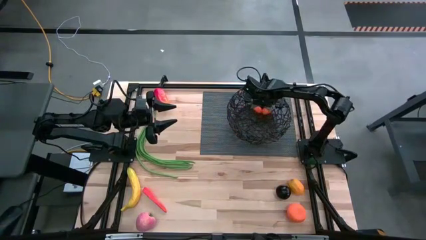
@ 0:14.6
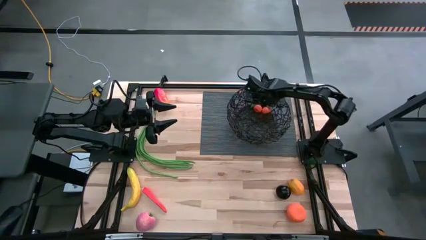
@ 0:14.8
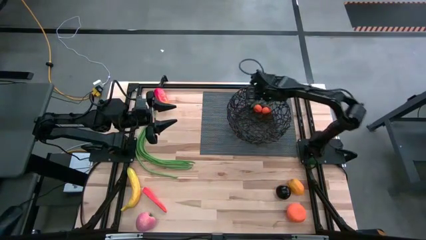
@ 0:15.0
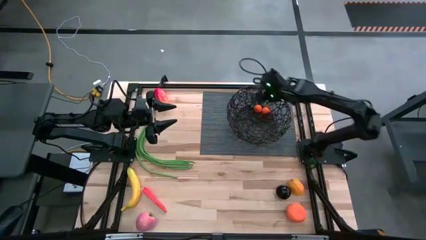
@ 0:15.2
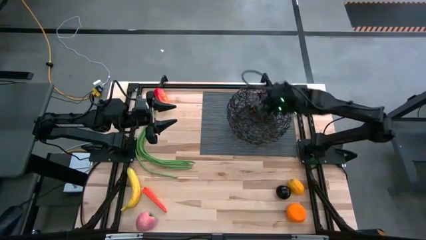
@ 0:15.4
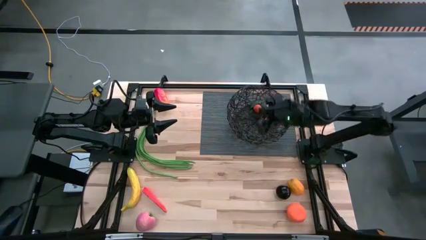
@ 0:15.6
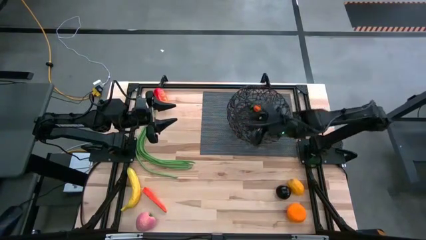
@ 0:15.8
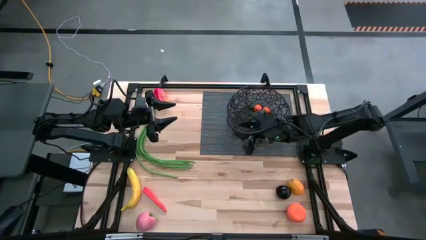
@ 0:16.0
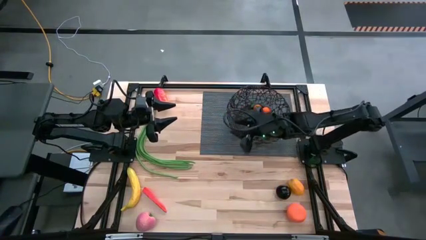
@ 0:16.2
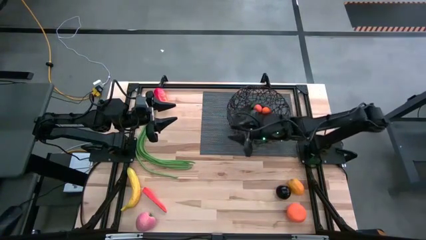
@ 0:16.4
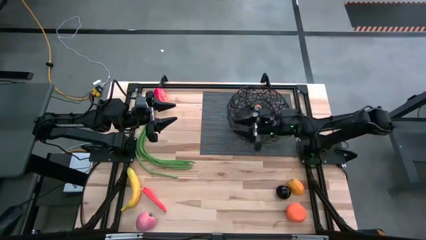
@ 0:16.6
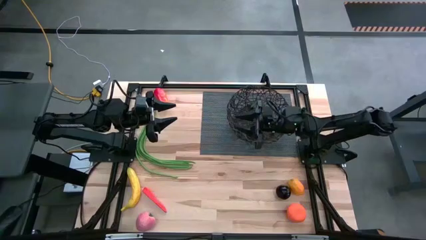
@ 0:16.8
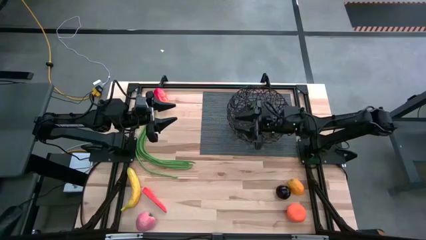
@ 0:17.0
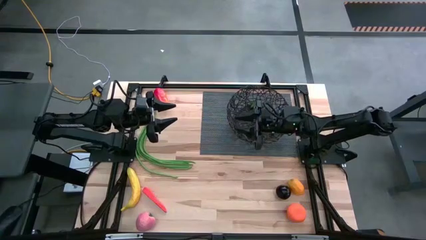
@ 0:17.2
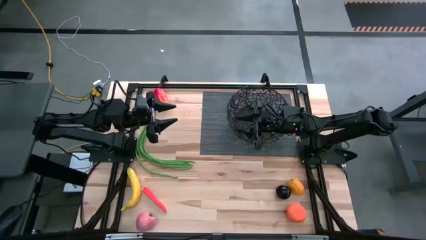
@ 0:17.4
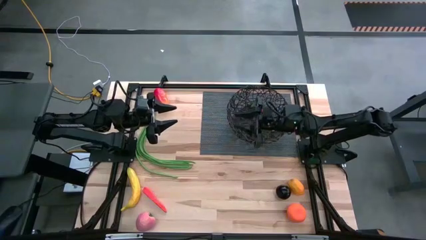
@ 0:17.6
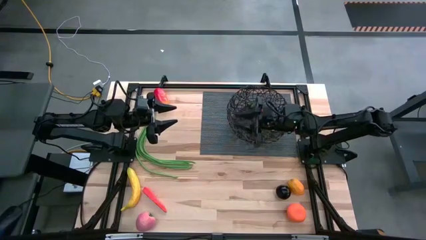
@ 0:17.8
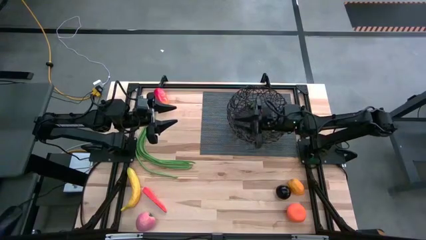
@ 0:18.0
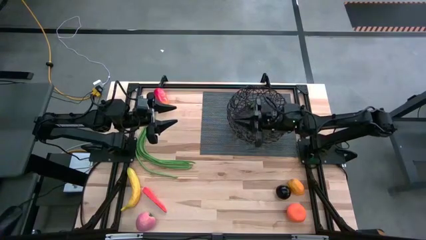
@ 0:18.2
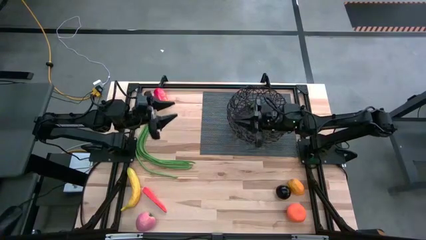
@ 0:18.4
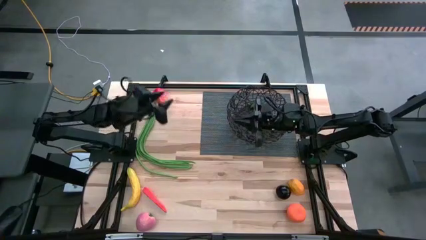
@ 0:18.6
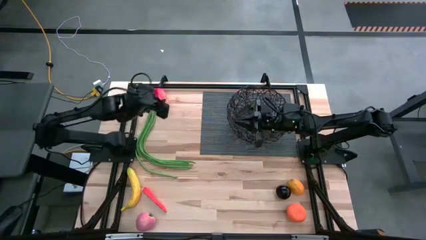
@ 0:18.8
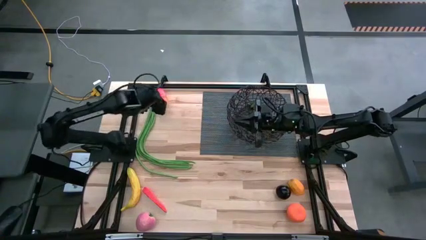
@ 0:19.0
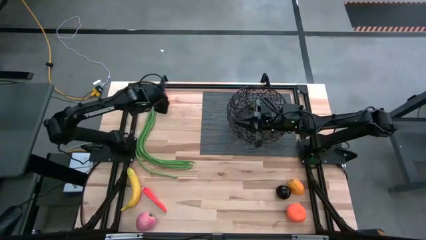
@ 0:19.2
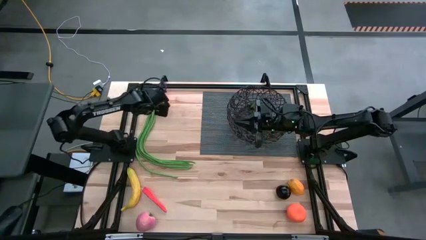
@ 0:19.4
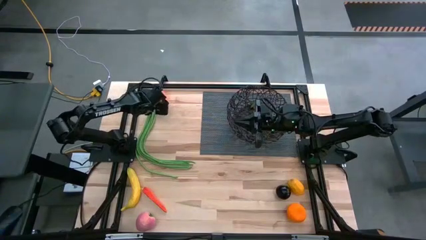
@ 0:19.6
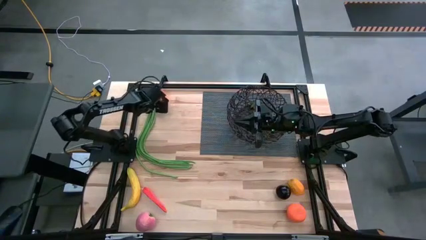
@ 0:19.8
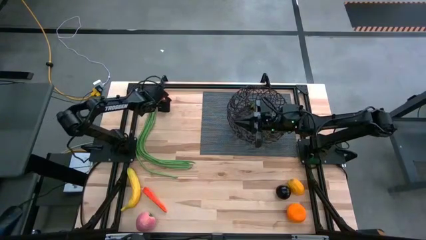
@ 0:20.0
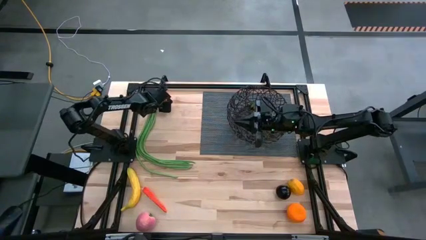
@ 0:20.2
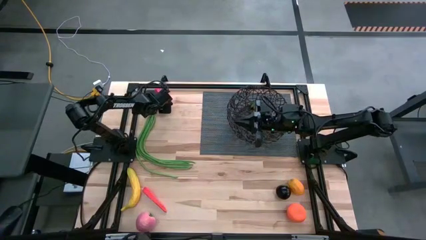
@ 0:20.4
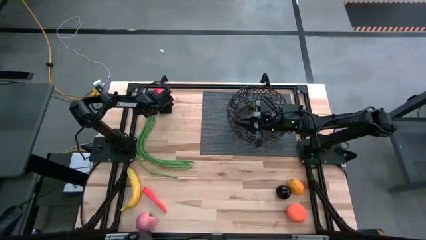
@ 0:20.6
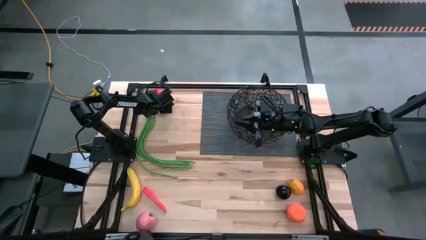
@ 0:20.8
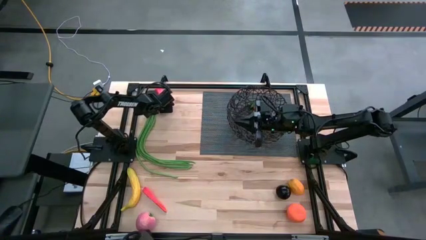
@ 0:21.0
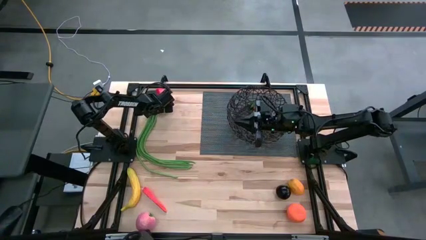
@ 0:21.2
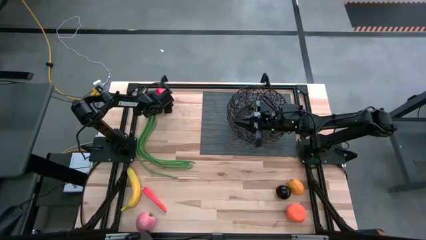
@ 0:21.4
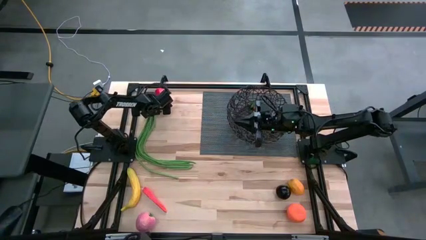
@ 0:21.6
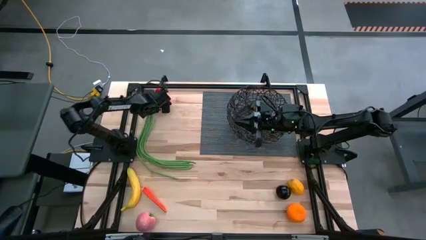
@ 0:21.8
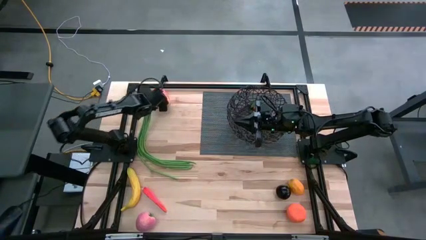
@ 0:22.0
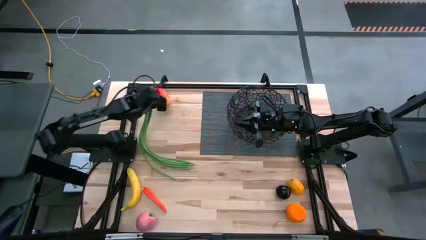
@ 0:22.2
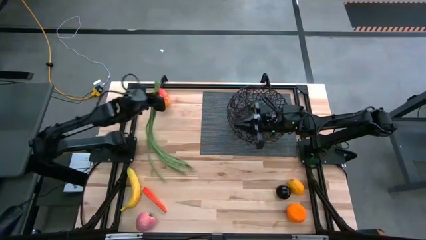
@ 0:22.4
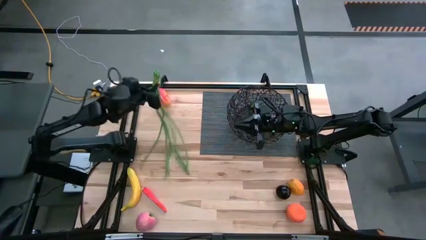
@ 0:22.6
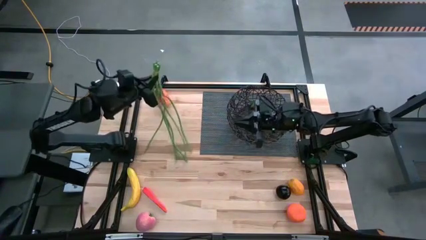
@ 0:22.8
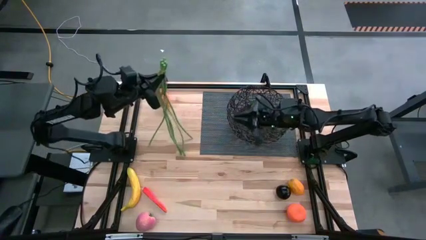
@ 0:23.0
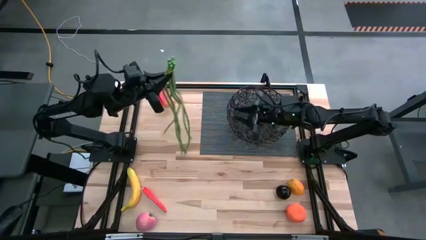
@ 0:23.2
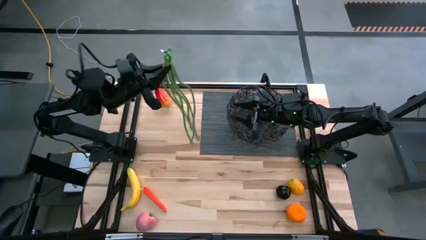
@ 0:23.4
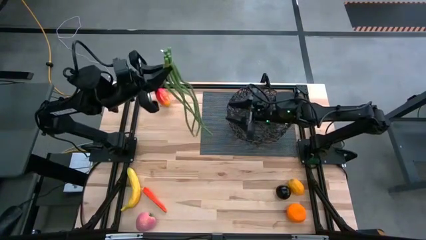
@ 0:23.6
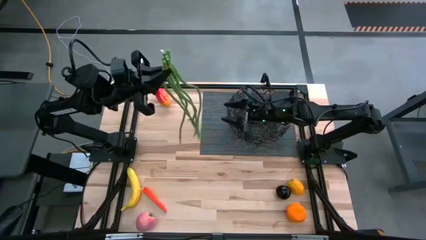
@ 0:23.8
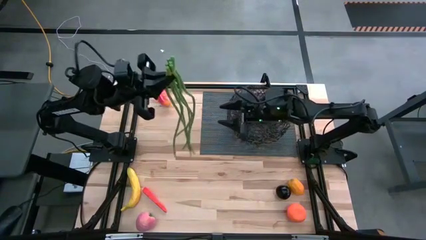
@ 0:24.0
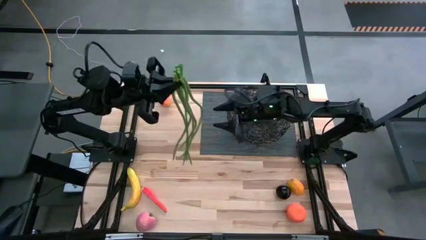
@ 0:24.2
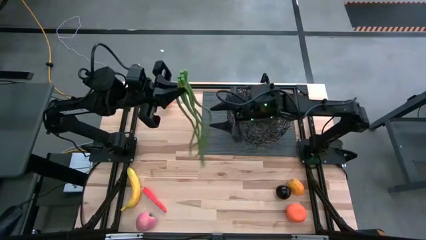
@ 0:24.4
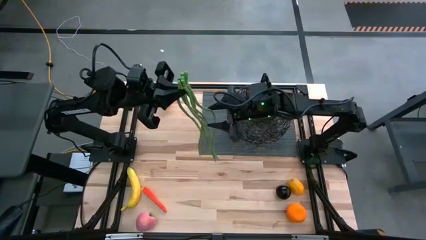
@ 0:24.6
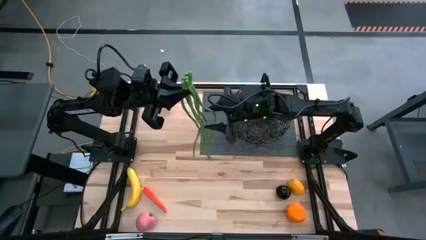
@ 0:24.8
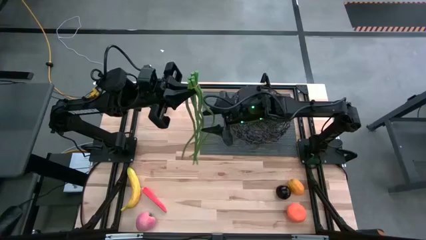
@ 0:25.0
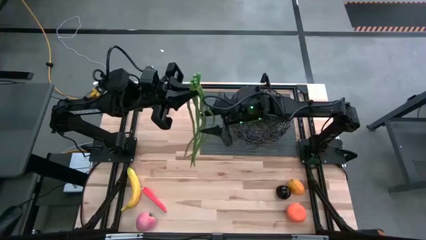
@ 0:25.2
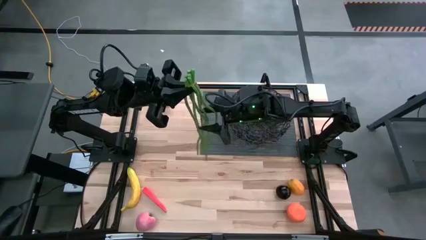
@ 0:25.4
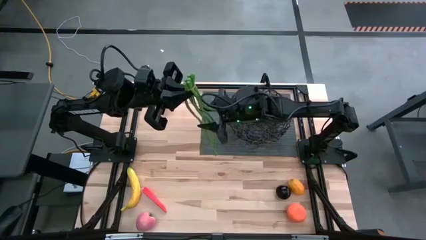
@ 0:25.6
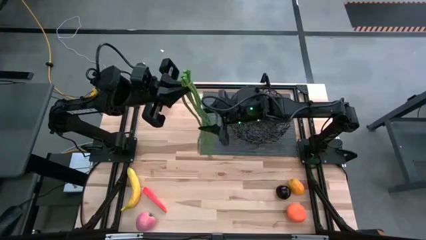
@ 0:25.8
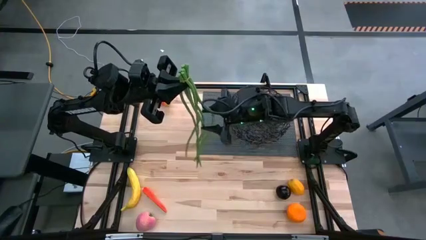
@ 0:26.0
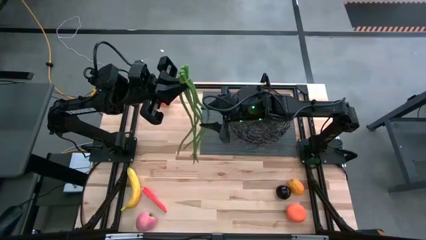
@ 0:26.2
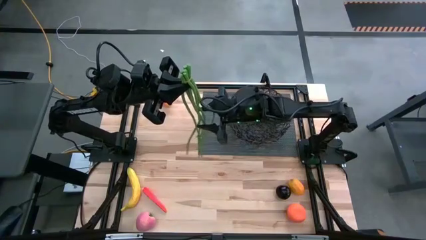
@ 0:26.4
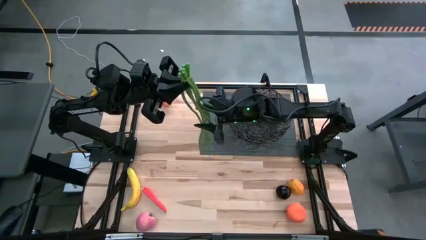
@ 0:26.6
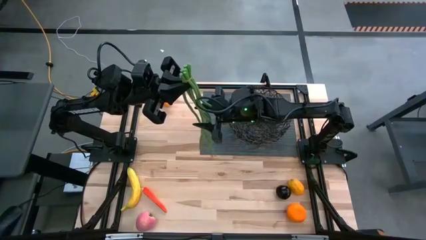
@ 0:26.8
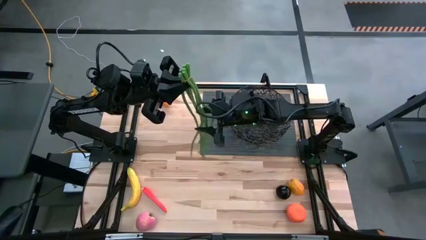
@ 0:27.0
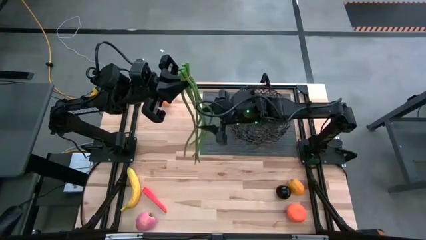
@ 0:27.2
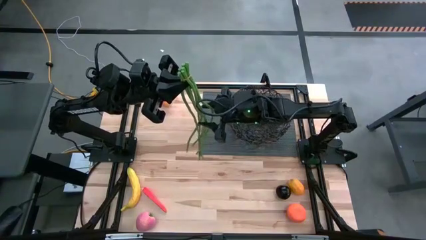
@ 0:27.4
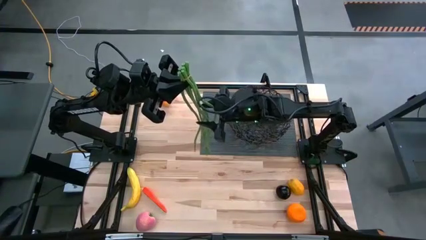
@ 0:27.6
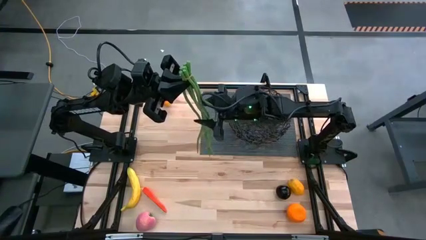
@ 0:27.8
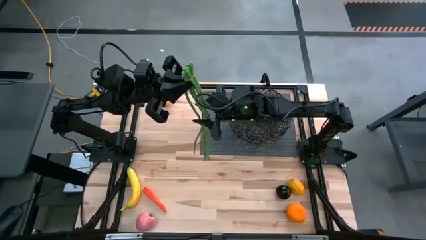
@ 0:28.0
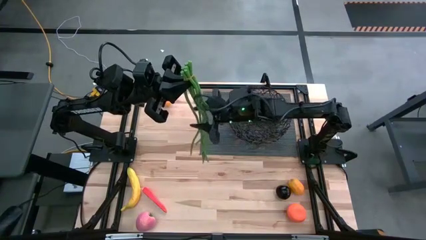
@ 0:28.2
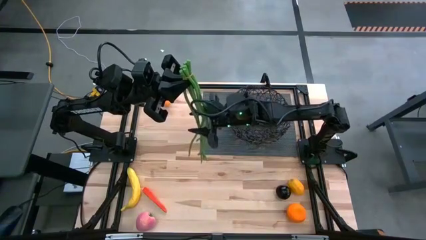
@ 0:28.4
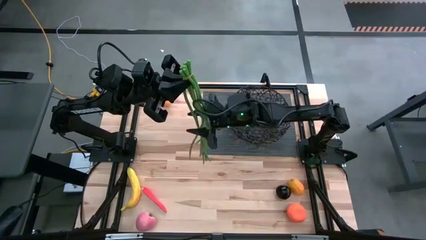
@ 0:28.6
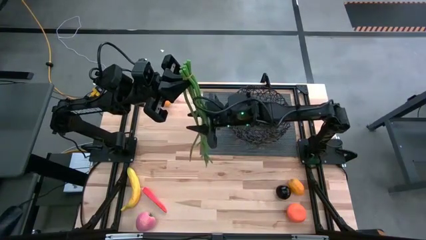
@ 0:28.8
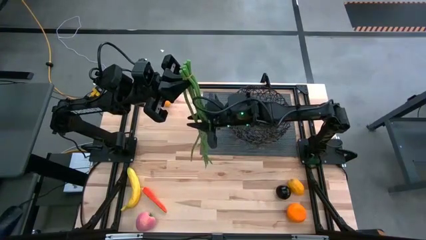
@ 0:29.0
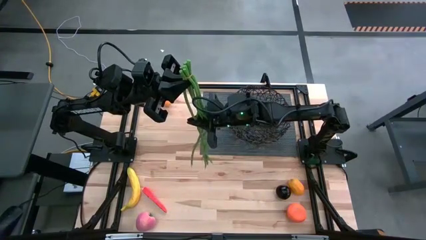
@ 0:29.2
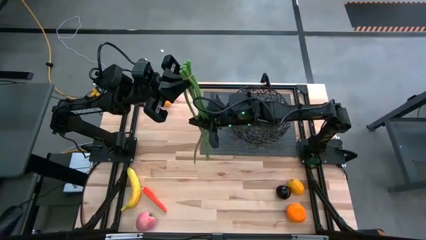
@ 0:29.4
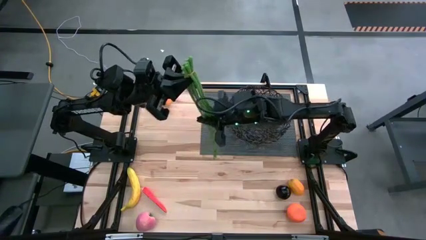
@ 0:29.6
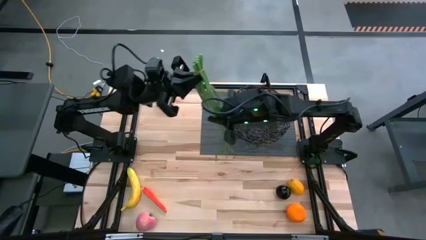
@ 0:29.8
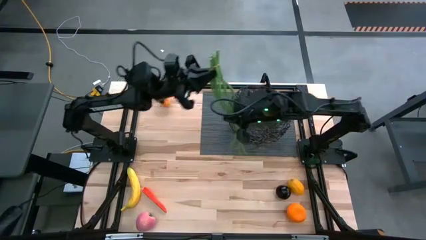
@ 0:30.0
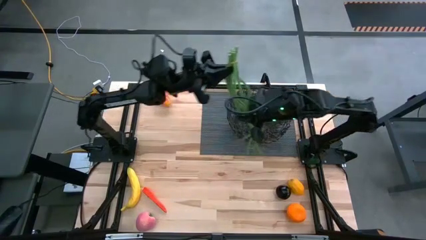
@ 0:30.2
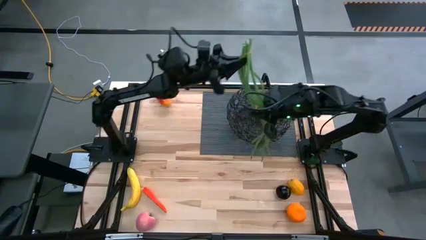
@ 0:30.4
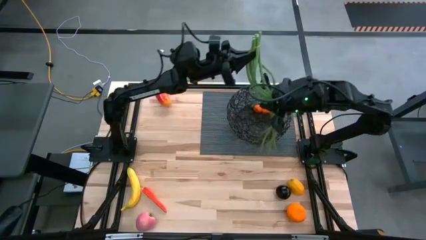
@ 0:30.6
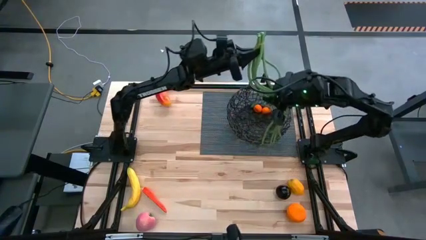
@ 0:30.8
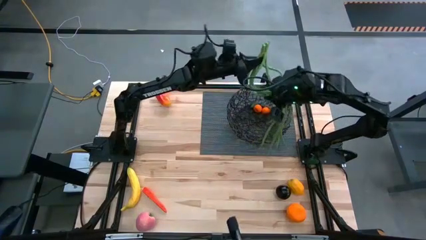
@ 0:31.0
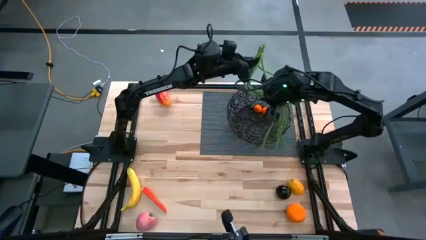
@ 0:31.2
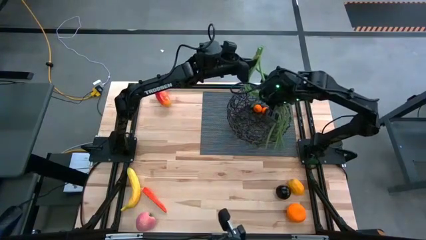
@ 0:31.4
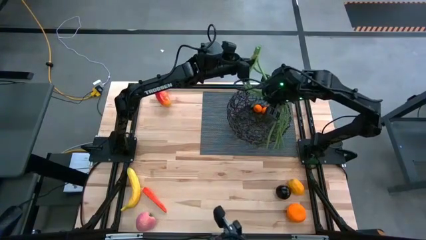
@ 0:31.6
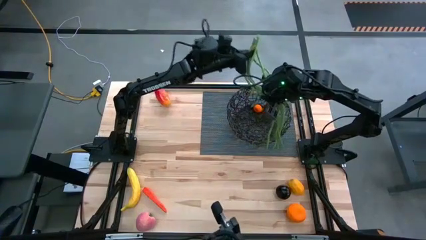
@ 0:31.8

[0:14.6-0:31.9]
Task: Build produce basket
Put the leaf lettuce into the wire basket
